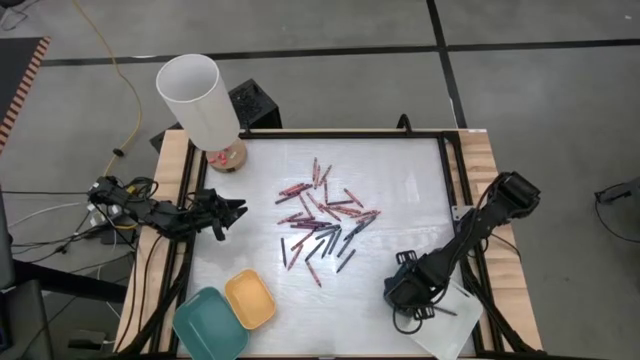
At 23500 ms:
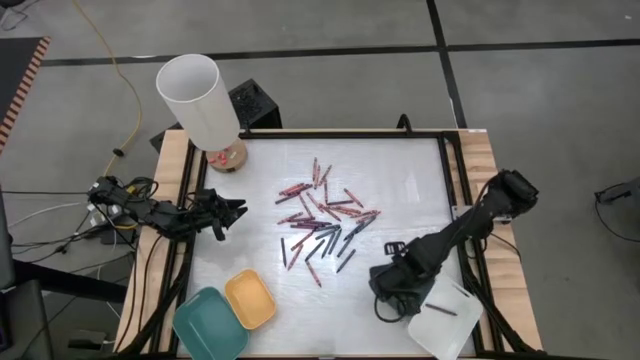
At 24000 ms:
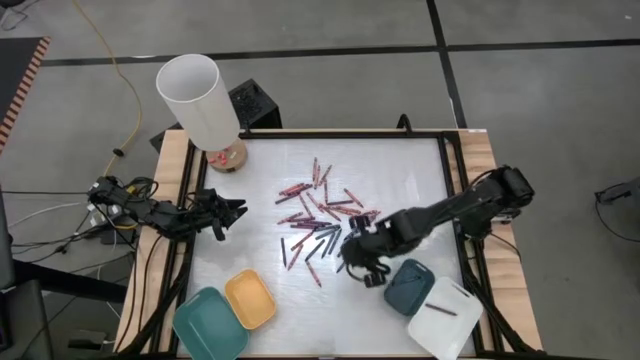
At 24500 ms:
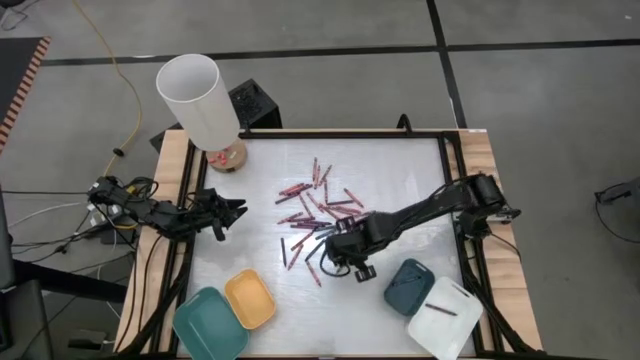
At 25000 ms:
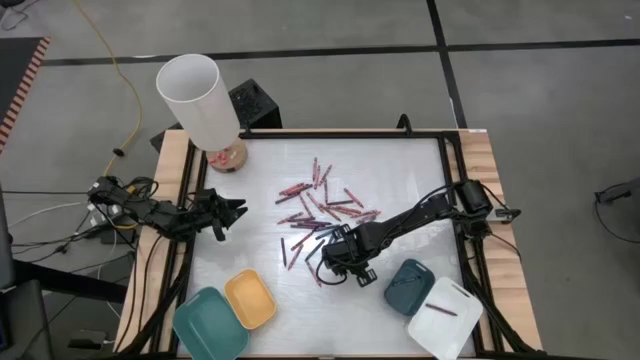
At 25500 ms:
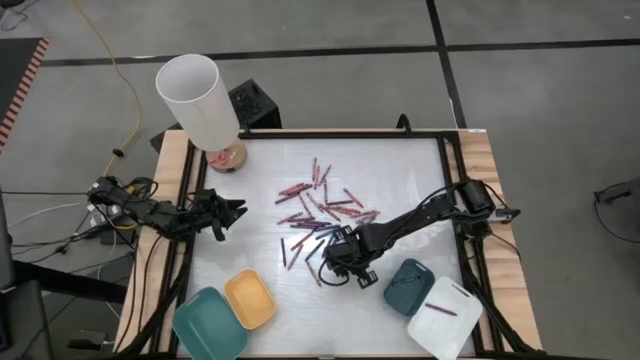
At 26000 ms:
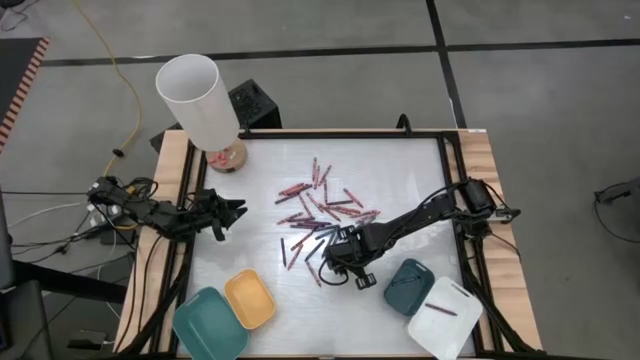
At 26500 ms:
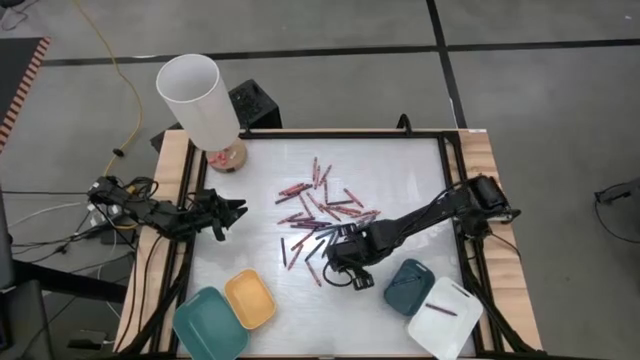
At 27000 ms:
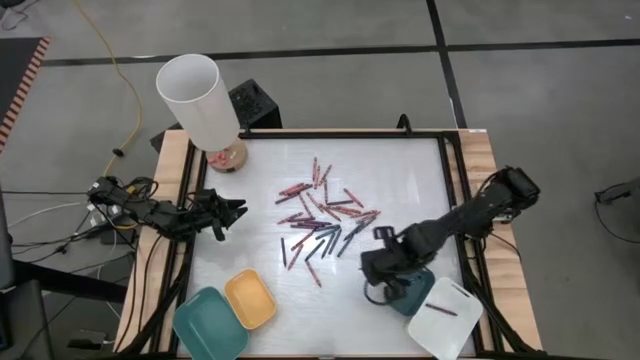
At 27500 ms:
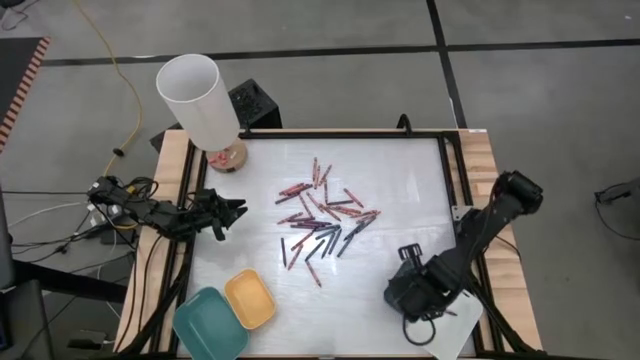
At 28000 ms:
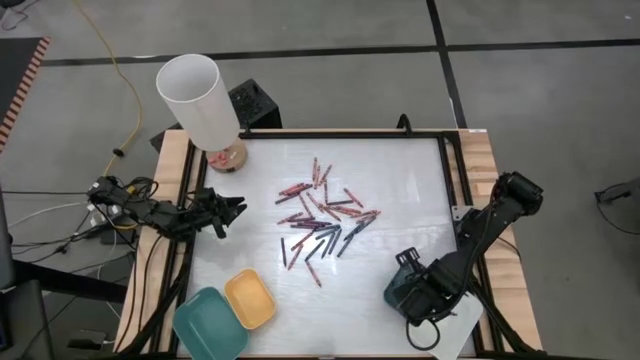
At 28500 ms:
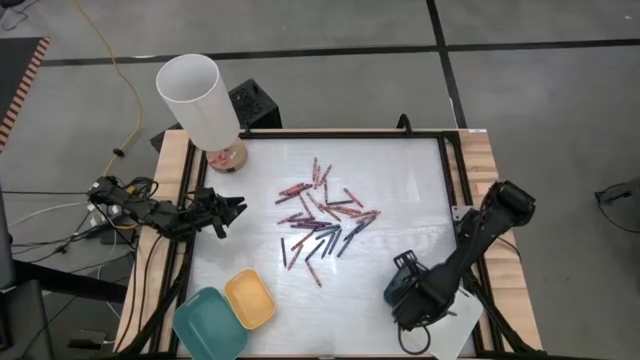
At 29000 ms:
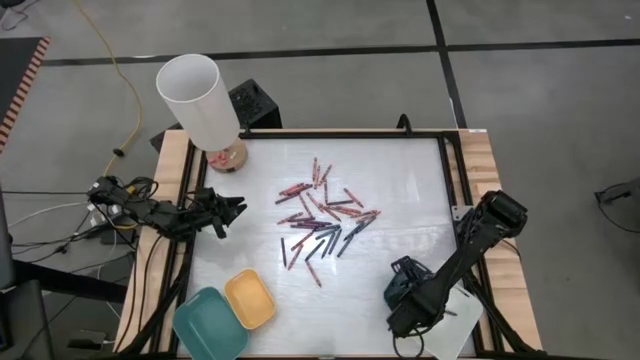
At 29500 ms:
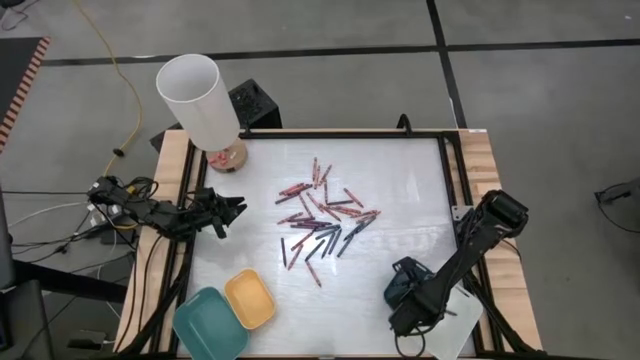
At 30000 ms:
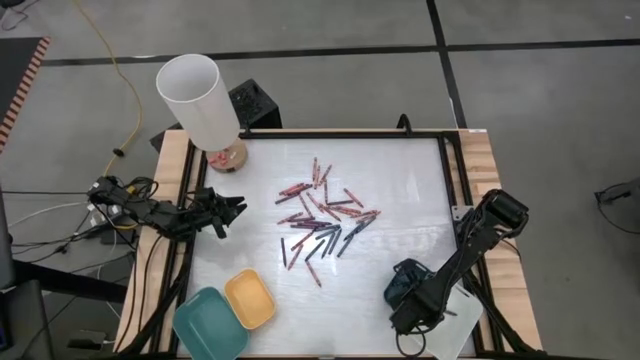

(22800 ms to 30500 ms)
Task: Sort crayons
Put the blue crayon into the dark blue bin

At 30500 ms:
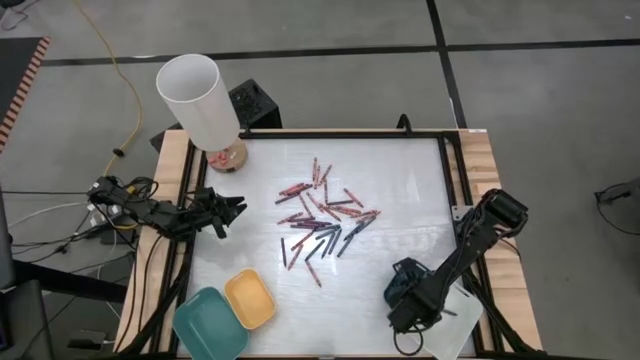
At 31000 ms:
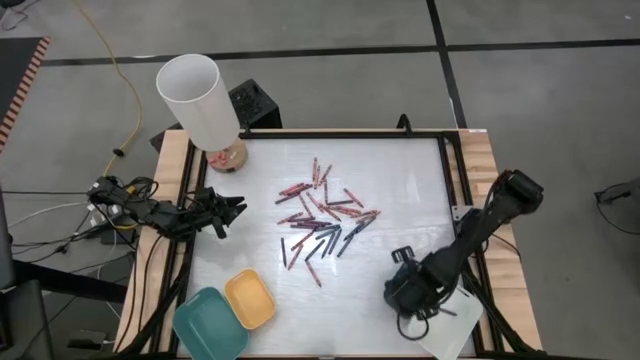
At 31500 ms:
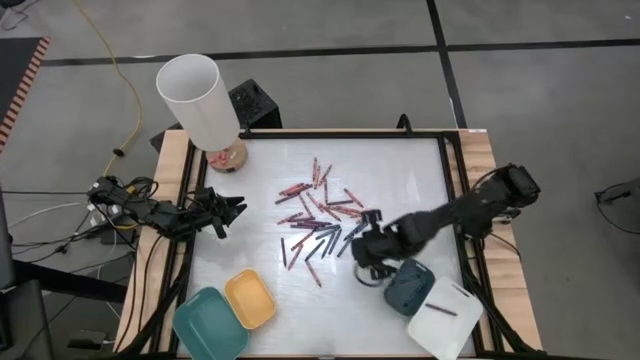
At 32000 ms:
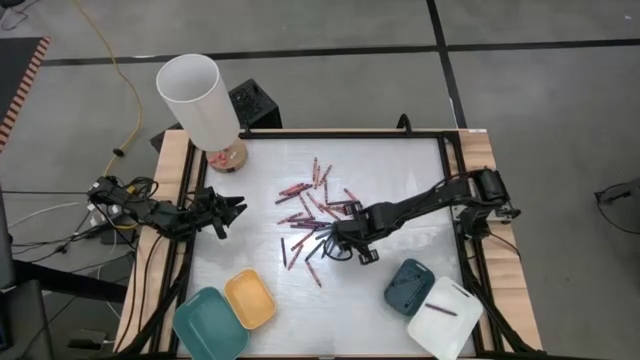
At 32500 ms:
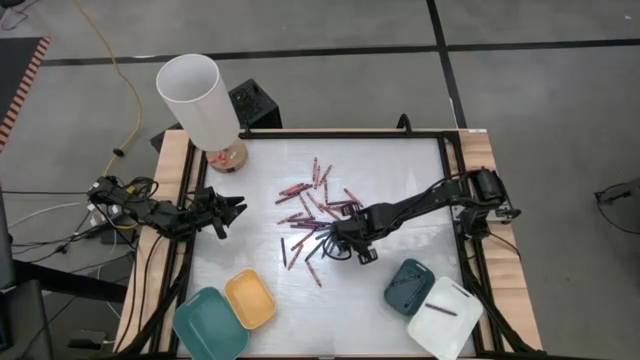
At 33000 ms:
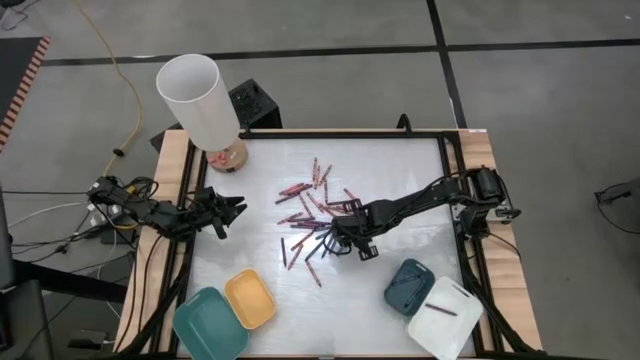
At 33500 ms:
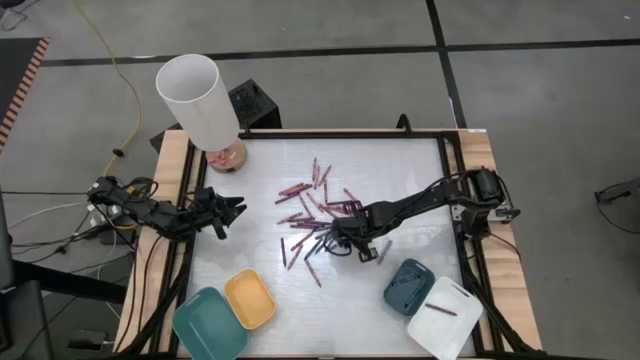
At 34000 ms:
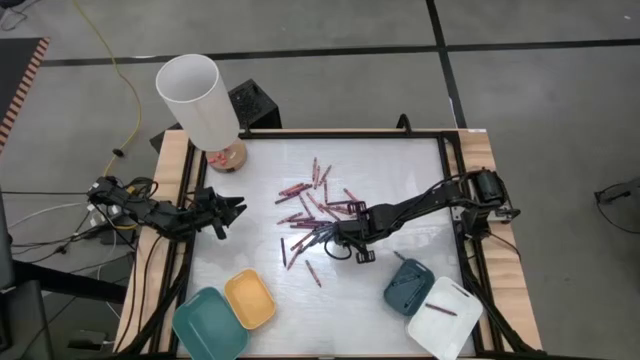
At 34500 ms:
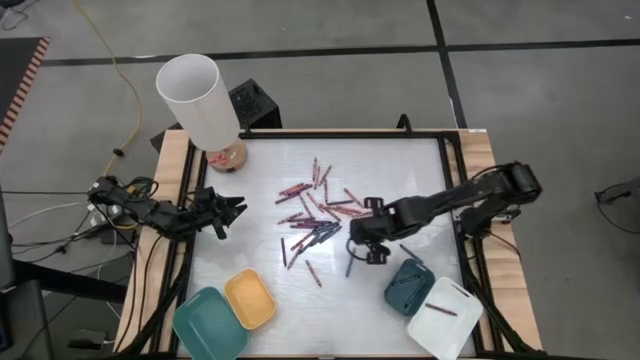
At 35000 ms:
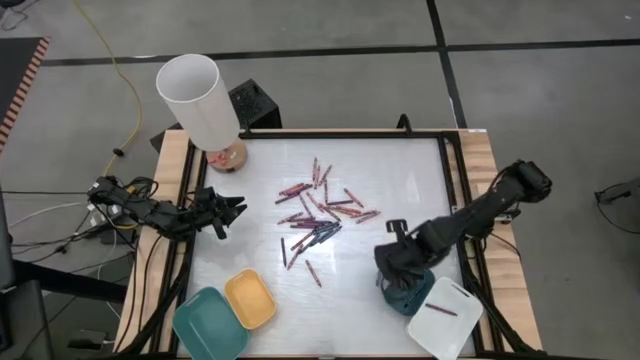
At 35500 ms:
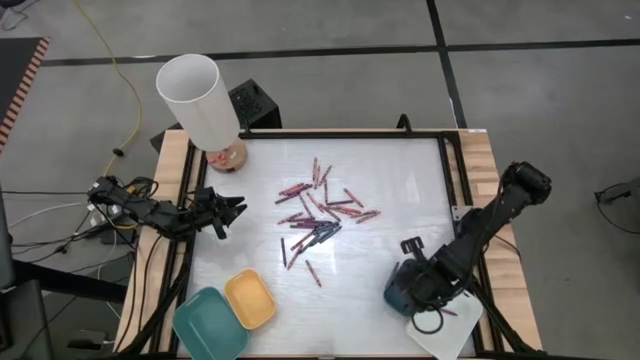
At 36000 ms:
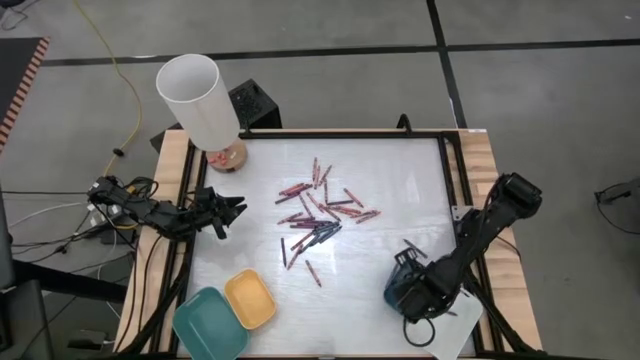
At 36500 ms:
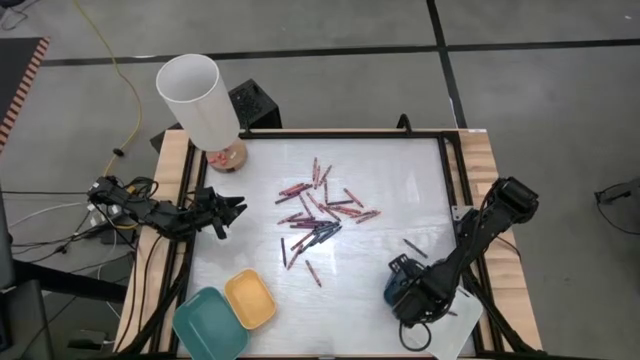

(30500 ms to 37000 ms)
Put the blue crayon into the dark blue bin

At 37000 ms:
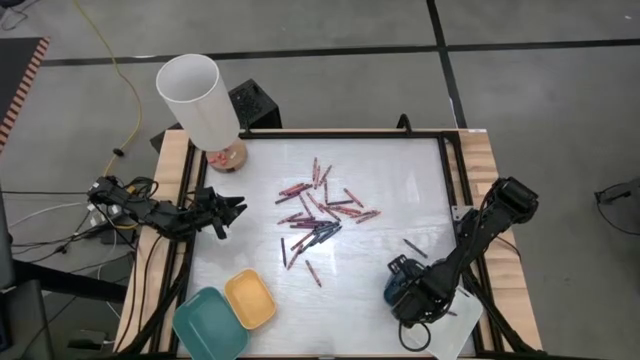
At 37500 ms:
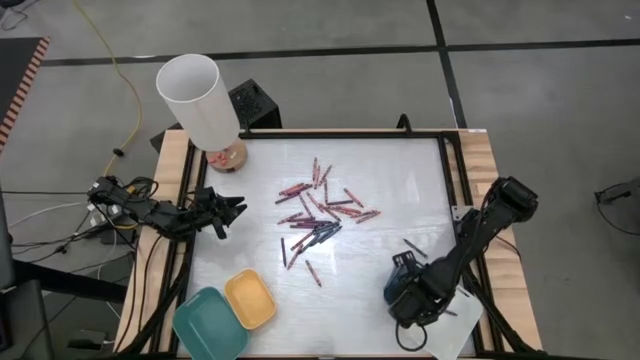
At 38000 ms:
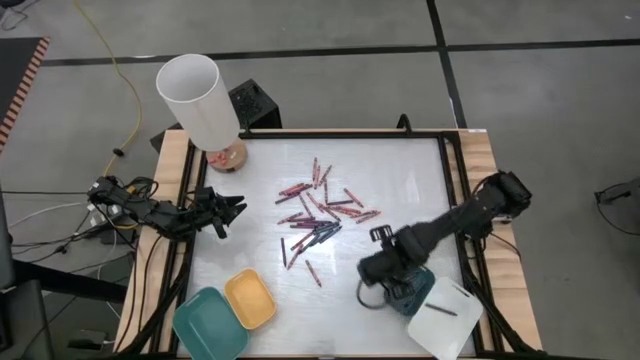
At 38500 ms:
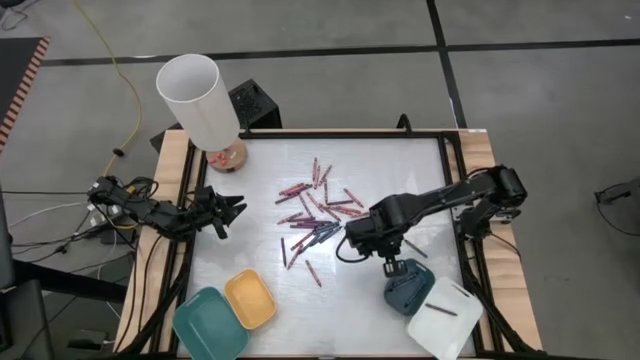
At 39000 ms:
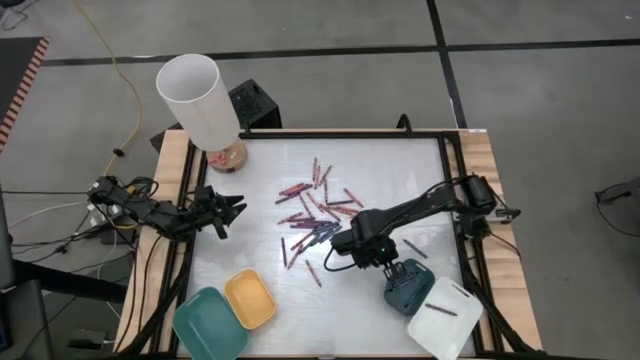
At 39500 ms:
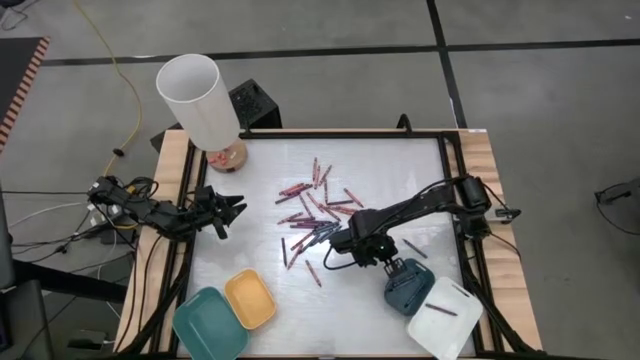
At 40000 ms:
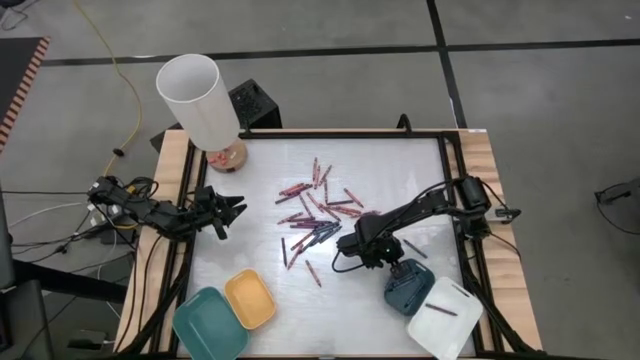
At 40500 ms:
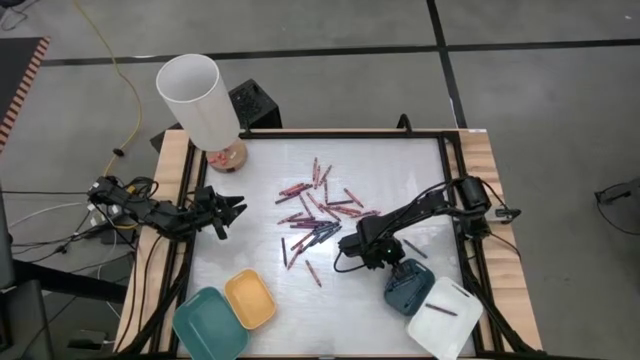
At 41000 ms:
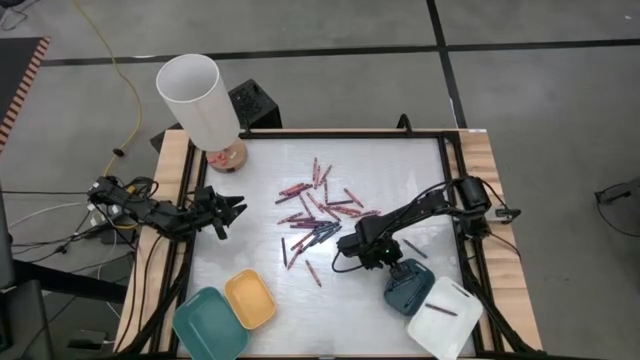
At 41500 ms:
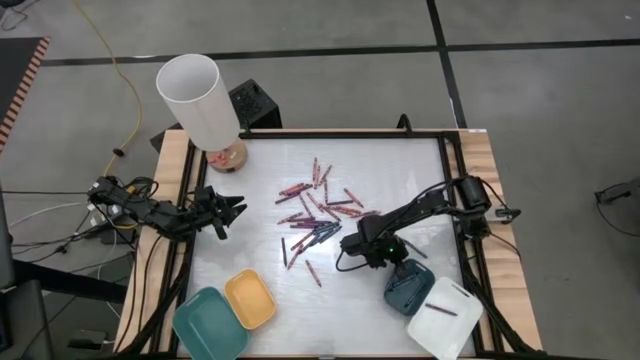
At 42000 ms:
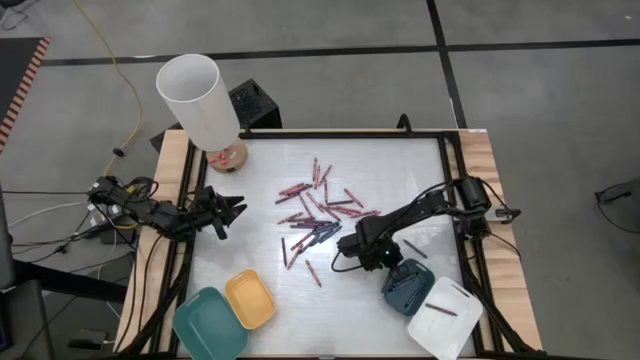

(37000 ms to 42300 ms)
Put the blue crayon into the dark blue bin

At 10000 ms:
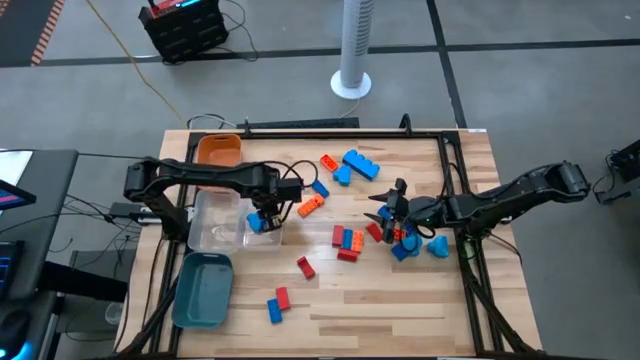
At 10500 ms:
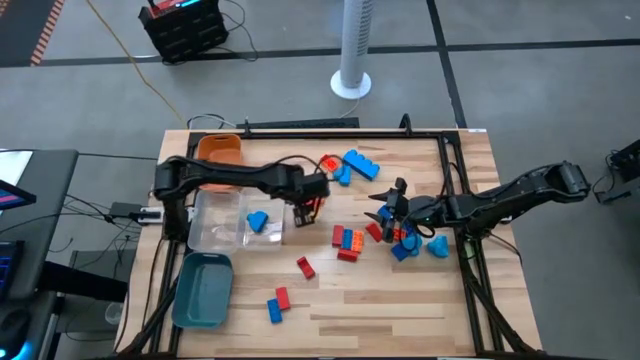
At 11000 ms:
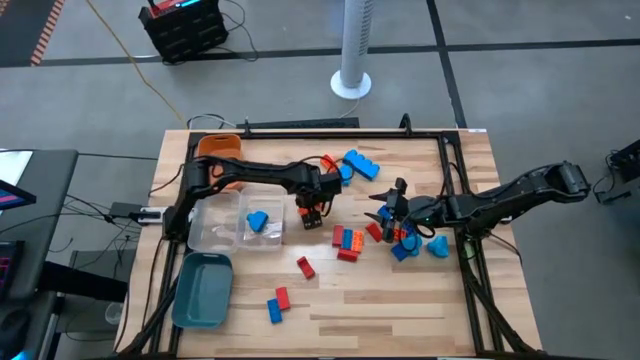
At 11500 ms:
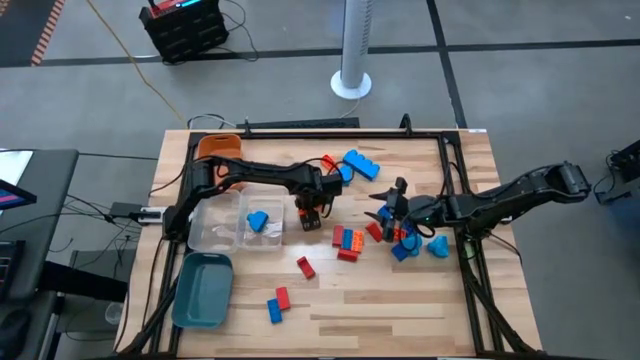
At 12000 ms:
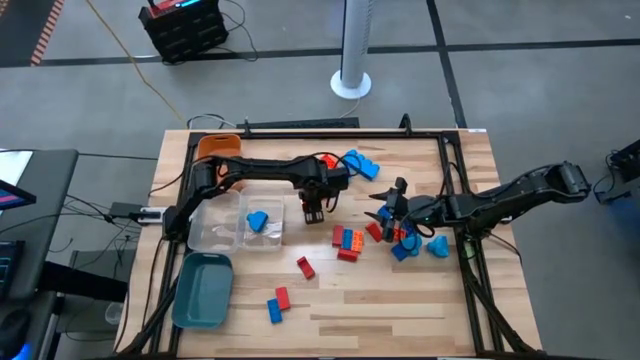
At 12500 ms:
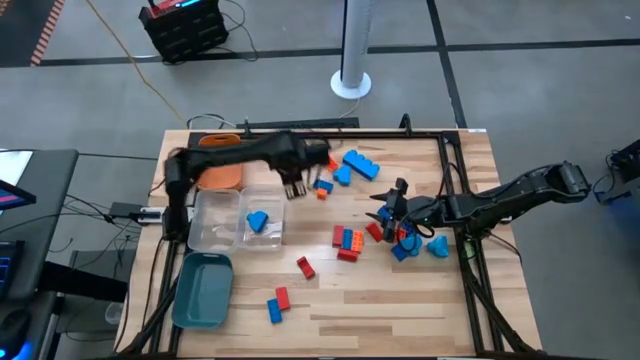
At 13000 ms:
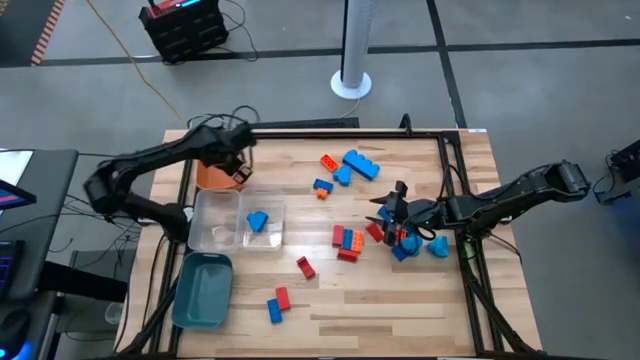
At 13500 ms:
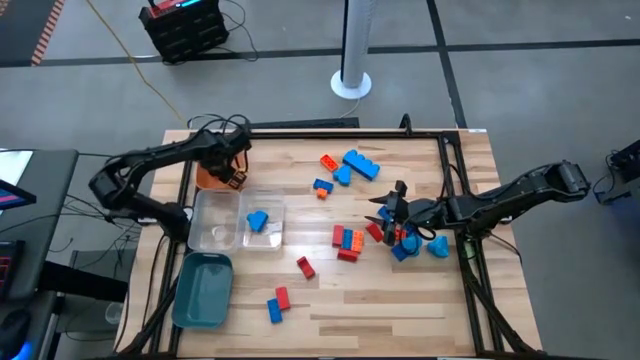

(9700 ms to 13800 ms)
Task: Sort blocks
Put the orange game piece into the orange bin
